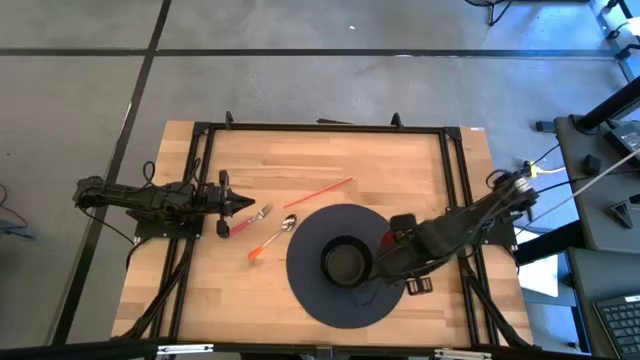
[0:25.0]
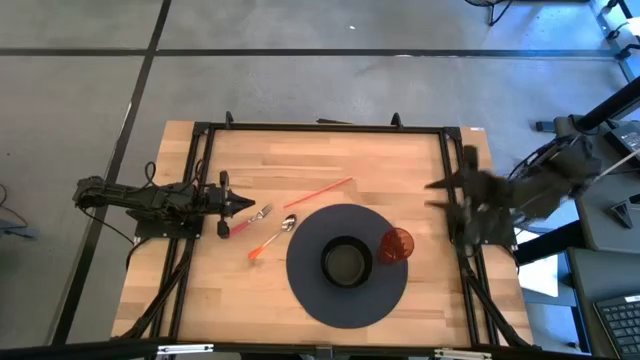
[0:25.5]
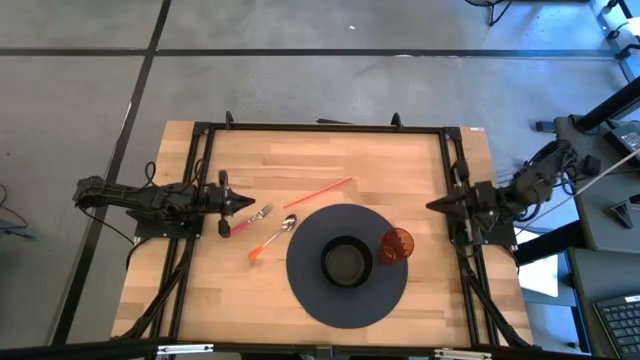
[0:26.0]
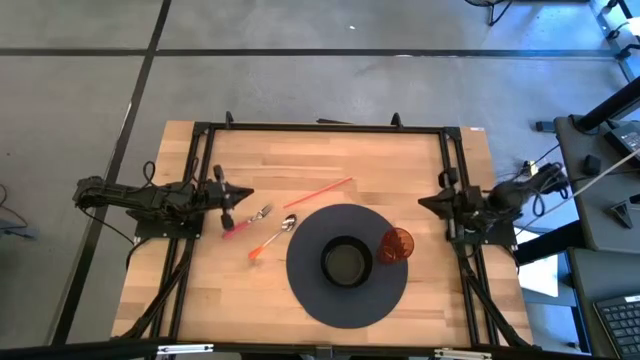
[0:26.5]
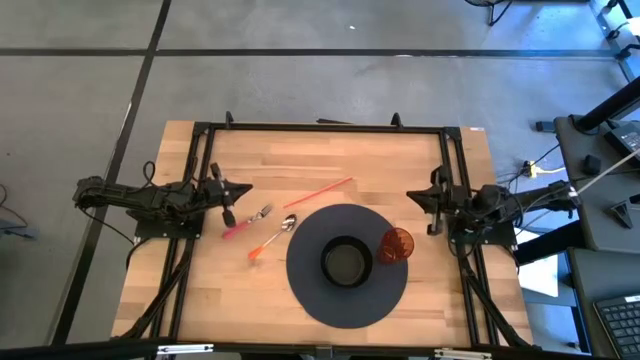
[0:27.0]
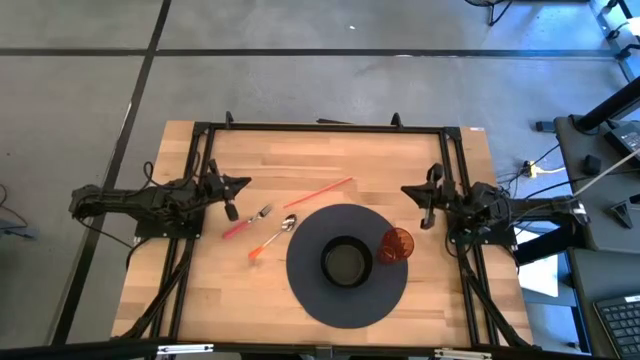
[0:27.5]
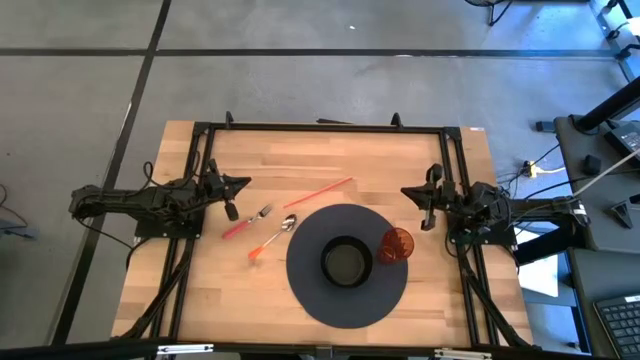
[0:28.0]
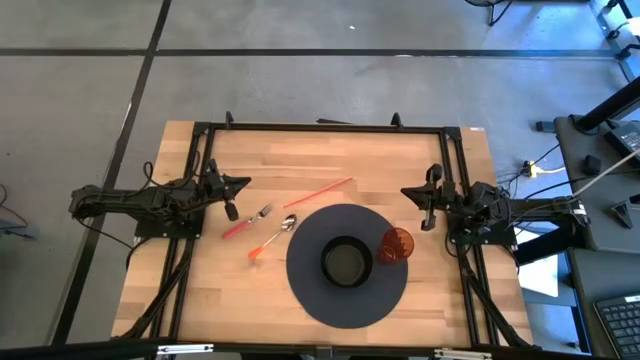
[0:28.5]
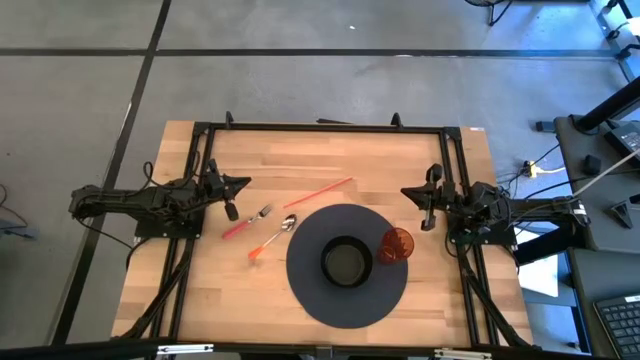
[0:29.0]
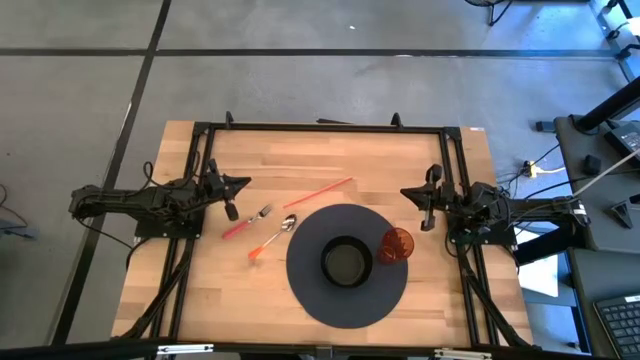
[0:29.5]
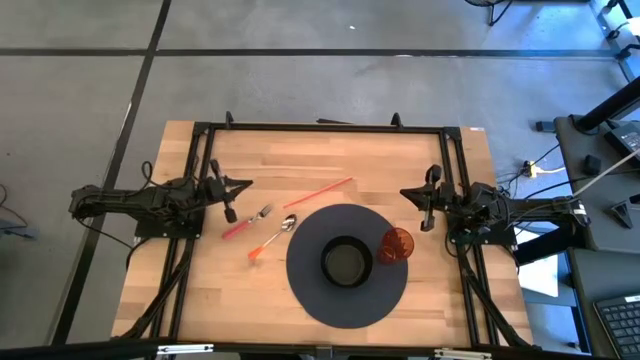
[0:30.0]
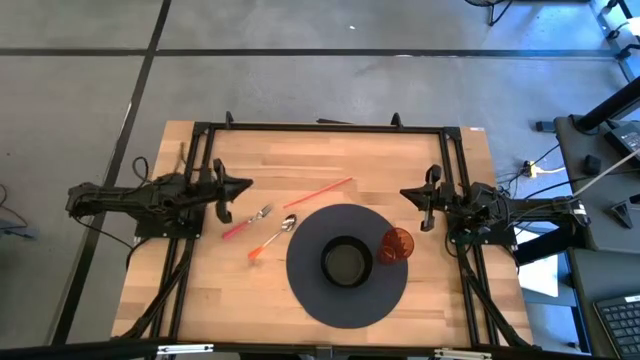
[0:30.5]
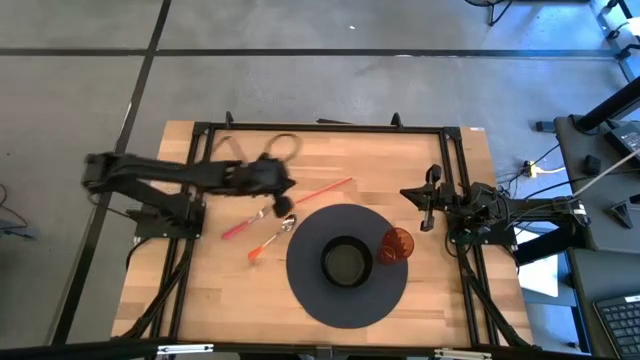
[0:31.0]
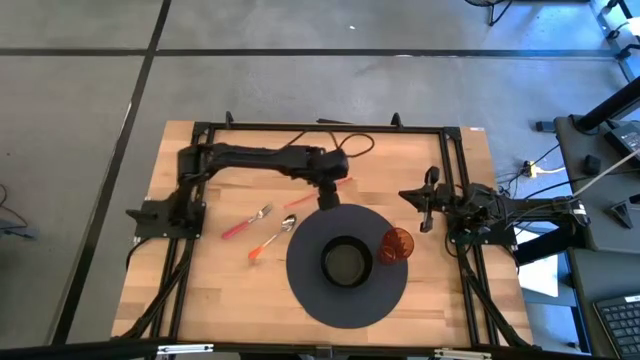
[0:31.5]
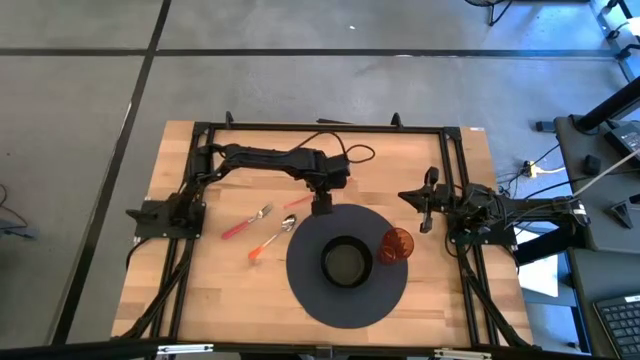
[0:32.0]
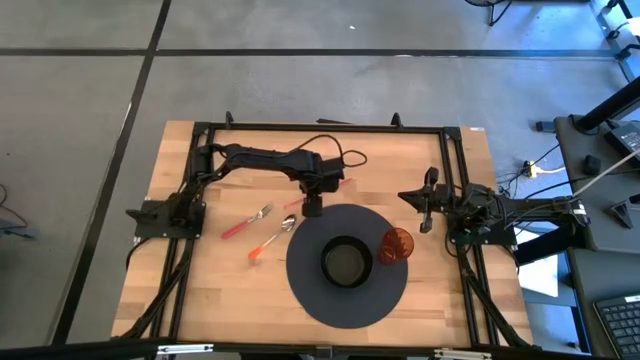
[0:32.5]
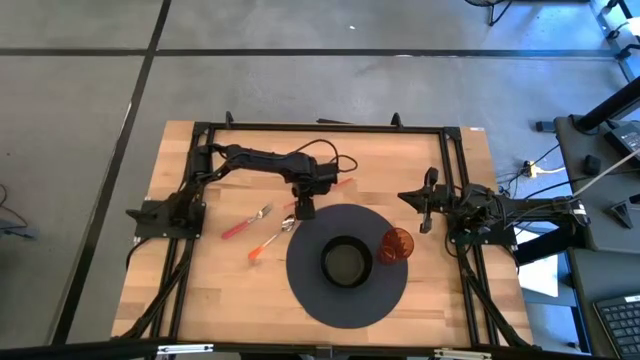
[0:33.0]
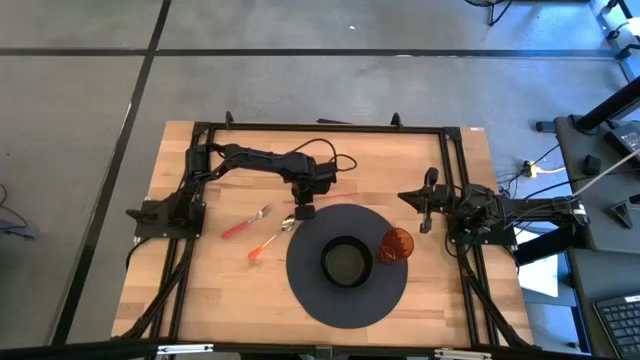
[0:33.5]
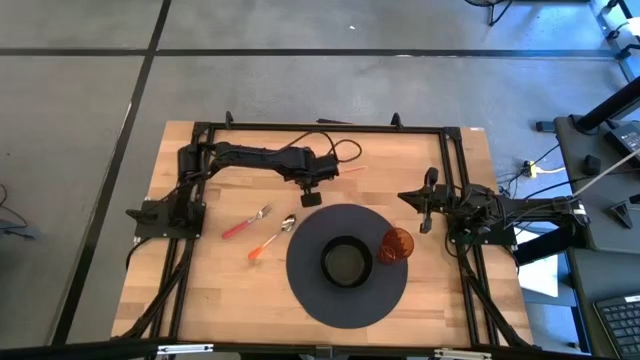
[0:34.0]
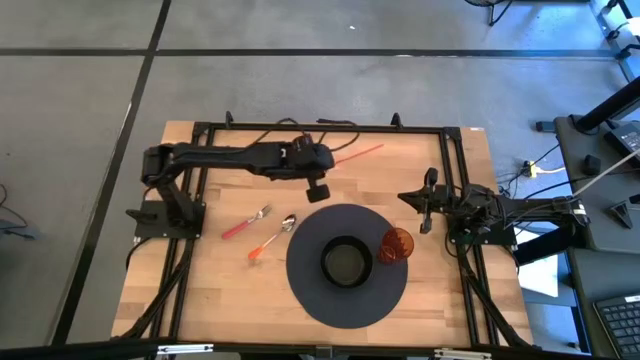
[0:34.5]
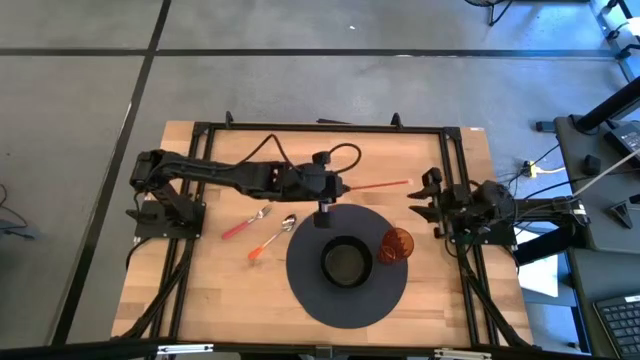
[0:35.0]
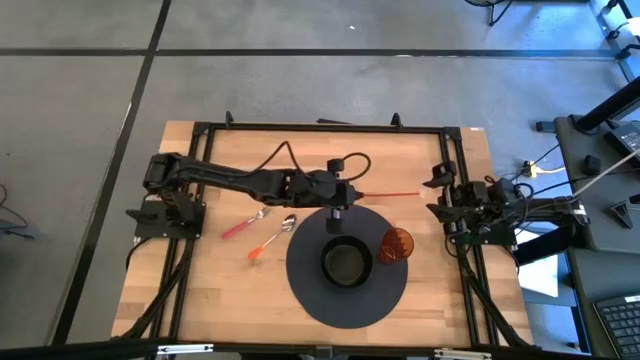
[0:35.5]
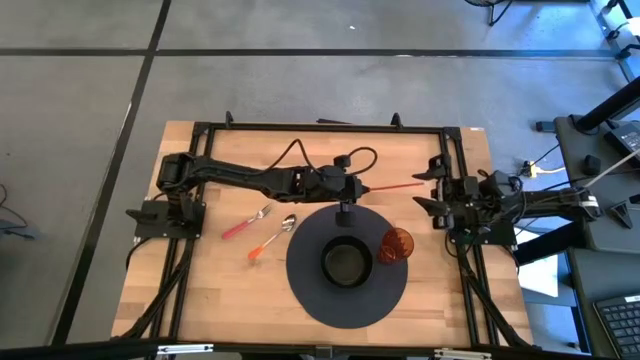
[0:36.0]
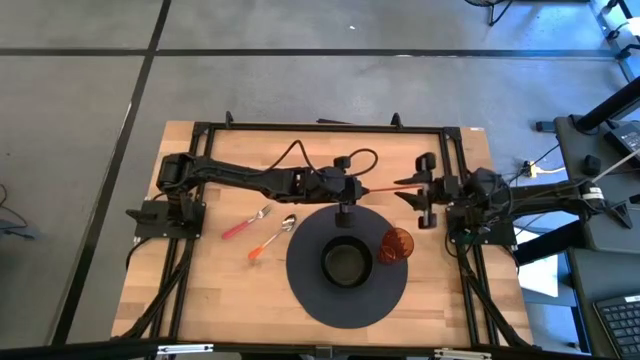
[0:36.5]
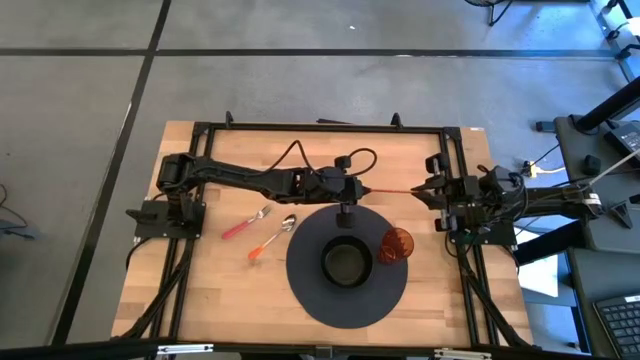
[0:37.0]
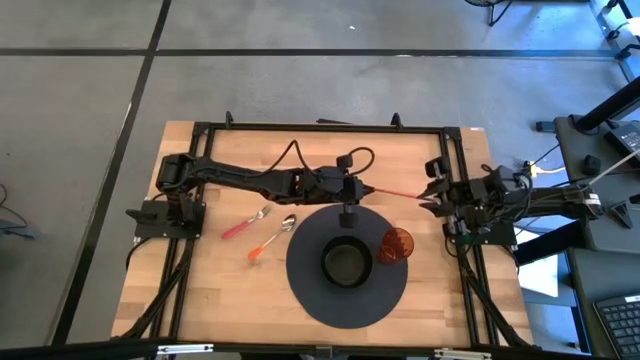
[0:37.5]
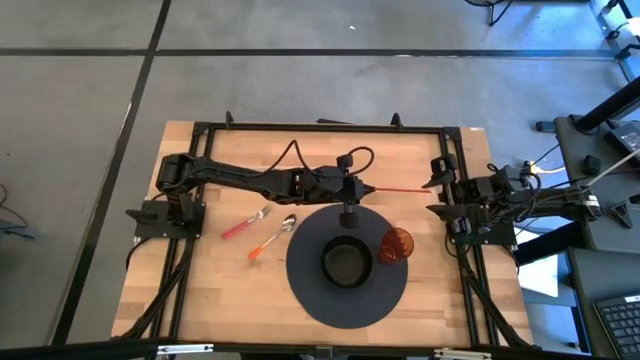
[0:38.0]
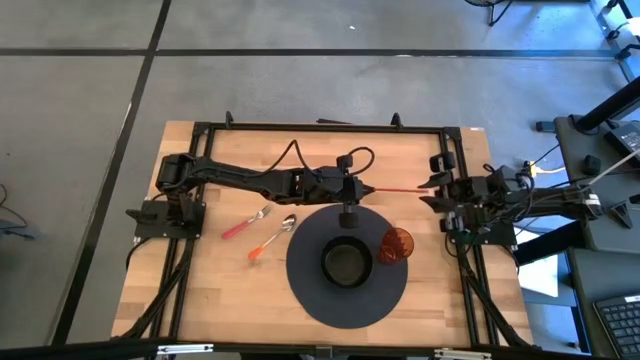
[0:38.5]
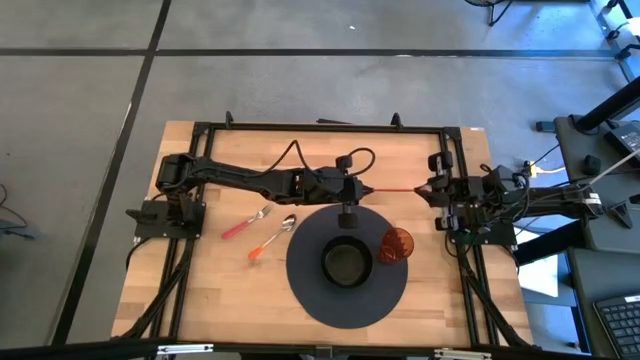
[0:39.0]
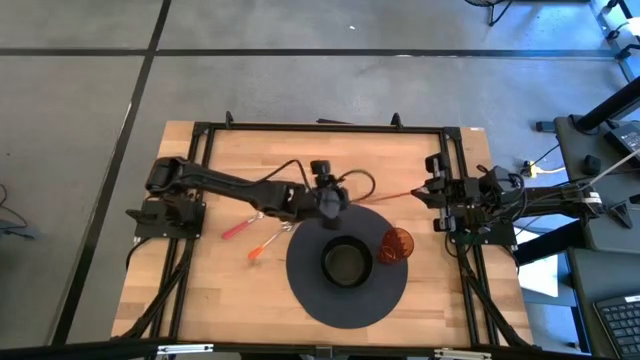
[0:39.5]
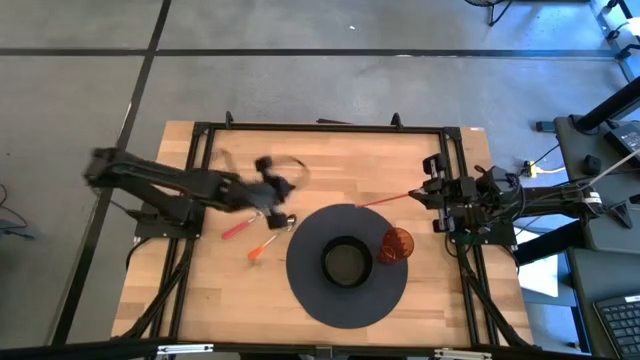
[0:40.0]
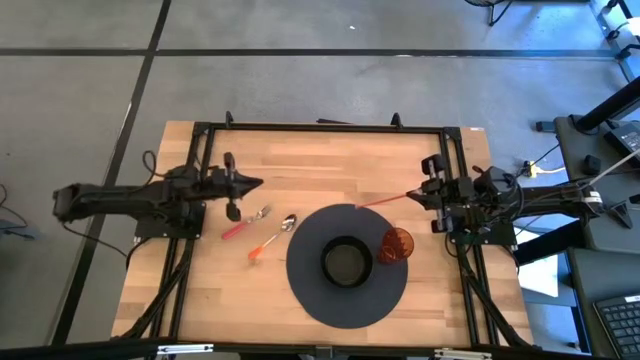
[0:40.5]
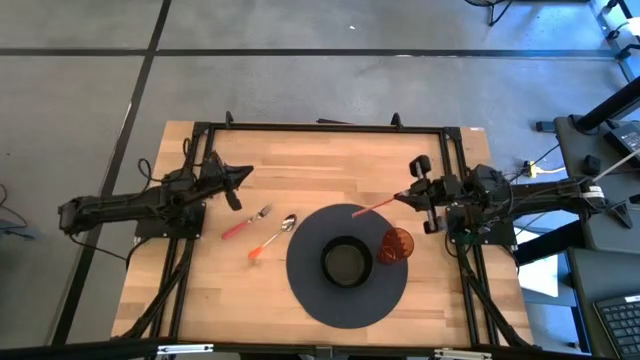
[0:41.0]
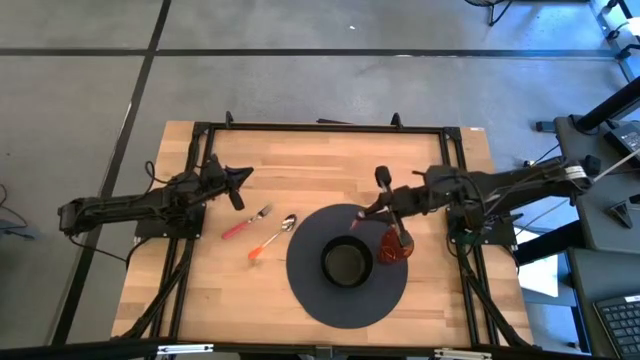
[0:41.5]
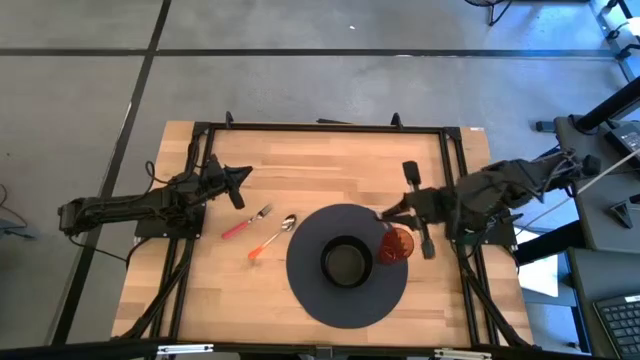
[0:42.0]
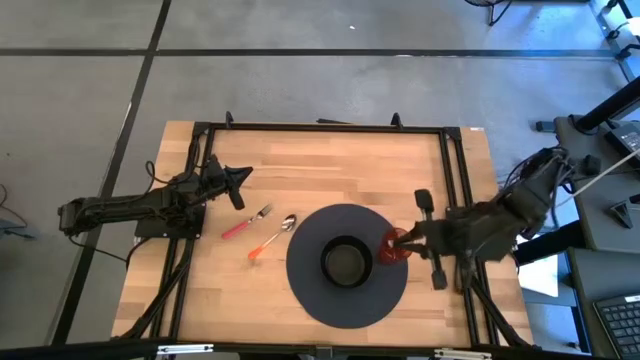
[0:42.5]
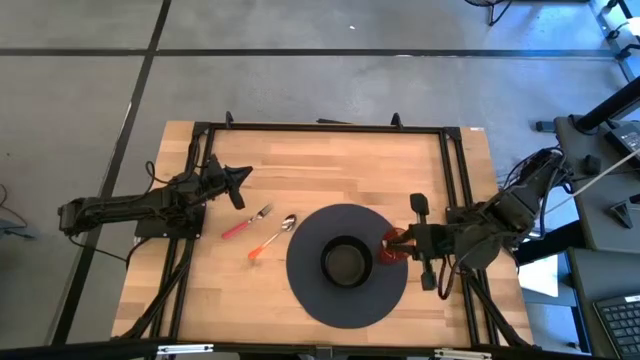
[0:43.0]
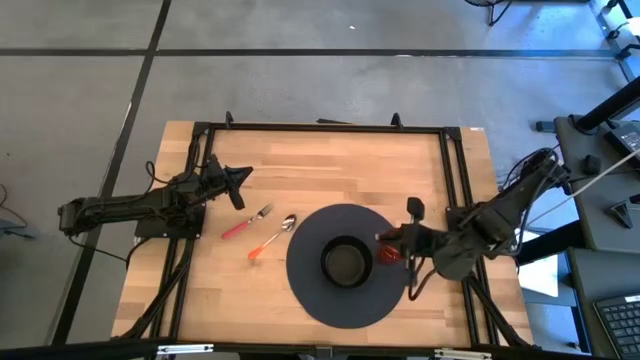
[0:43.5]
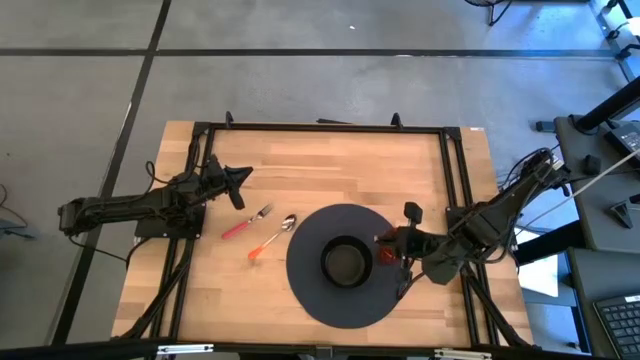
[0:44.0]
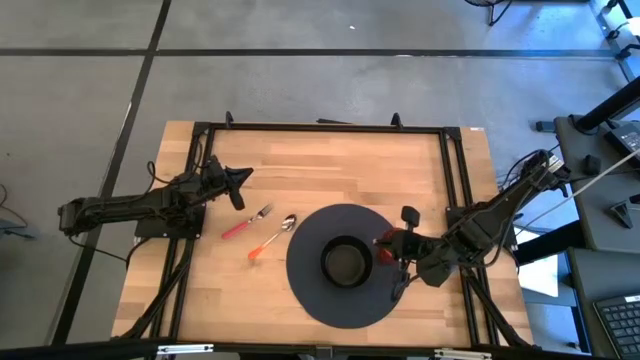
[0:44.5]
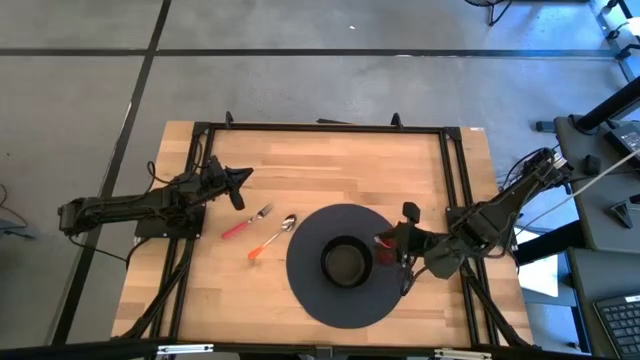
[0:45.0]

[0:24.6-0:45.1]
Task: Pick & Place Utensil
Put the orange straw into the brown cup
